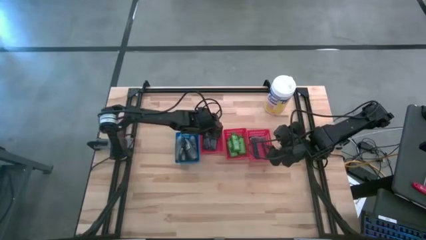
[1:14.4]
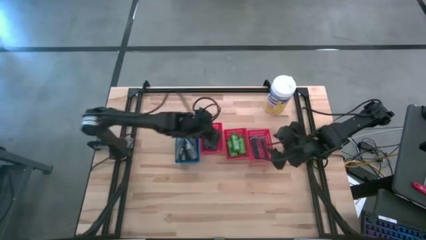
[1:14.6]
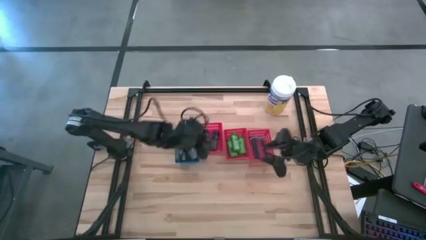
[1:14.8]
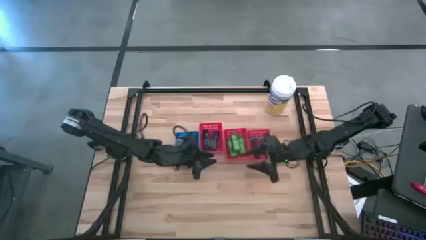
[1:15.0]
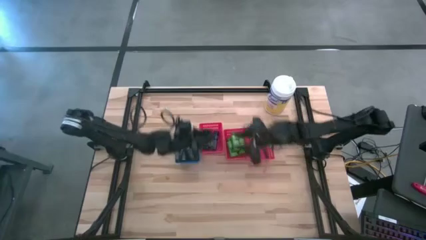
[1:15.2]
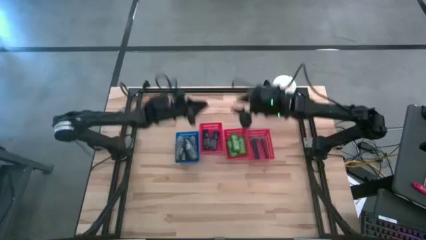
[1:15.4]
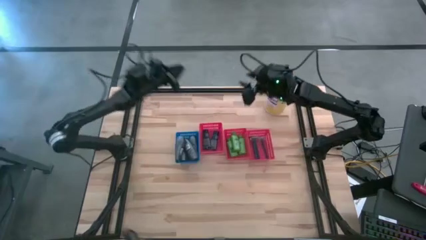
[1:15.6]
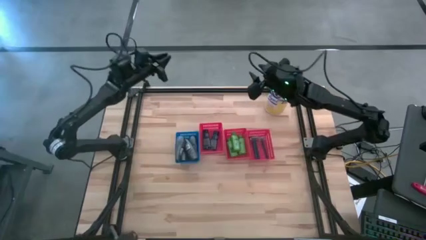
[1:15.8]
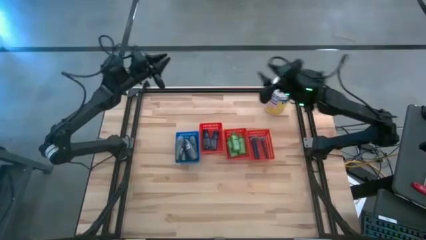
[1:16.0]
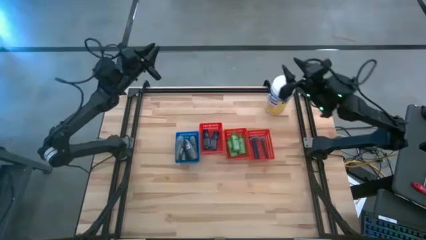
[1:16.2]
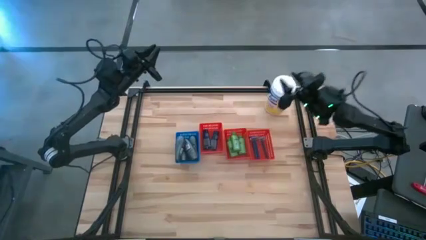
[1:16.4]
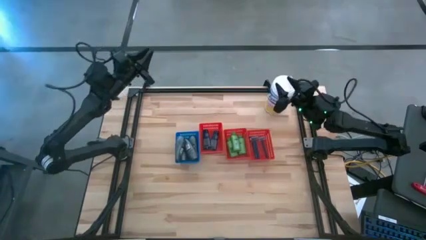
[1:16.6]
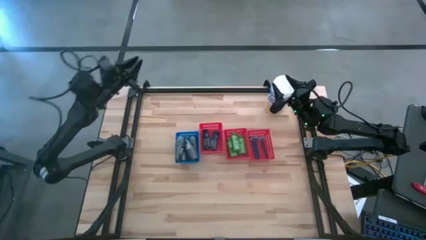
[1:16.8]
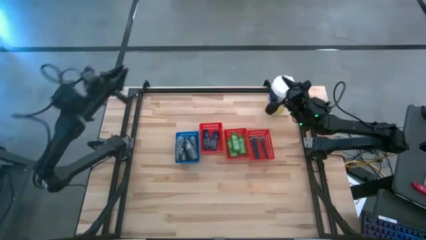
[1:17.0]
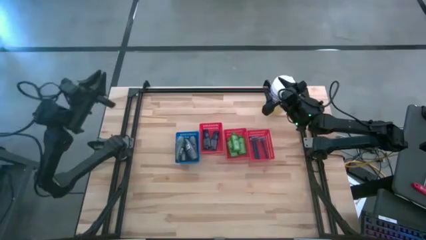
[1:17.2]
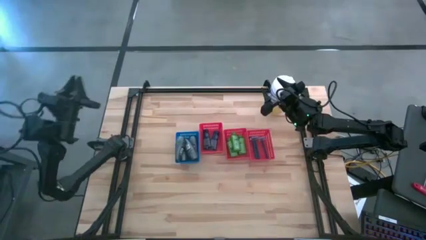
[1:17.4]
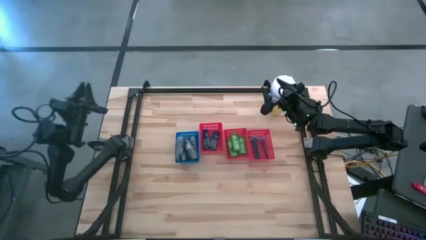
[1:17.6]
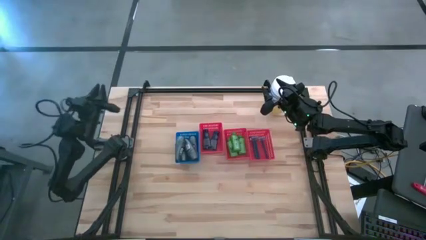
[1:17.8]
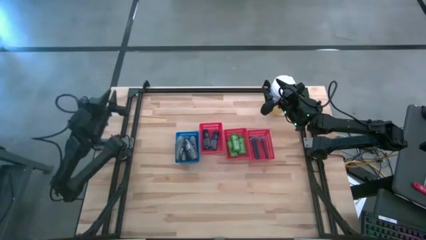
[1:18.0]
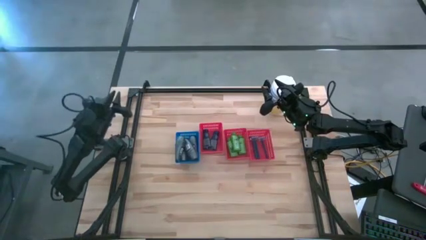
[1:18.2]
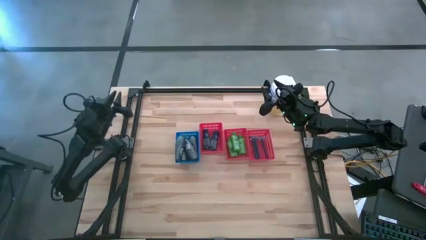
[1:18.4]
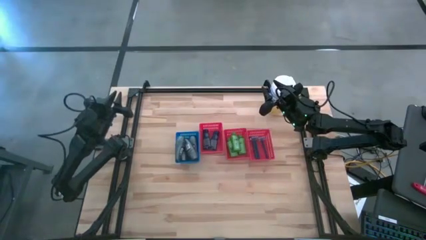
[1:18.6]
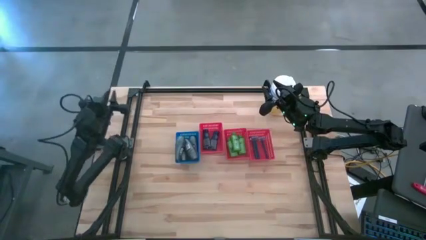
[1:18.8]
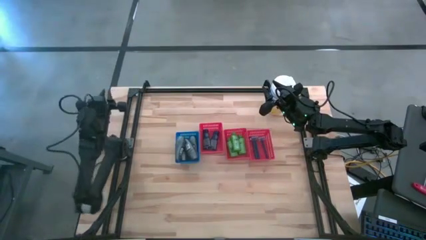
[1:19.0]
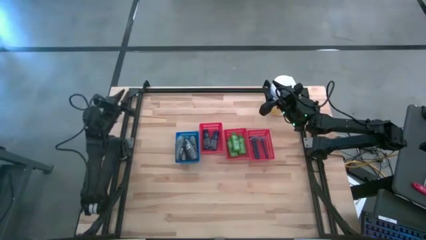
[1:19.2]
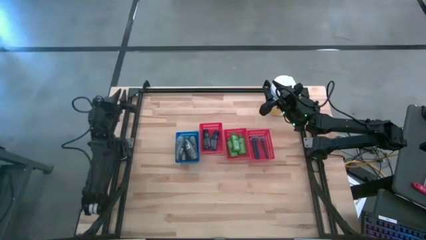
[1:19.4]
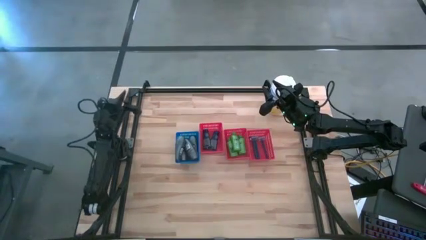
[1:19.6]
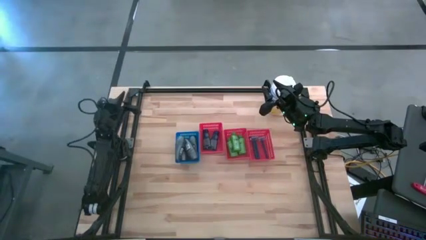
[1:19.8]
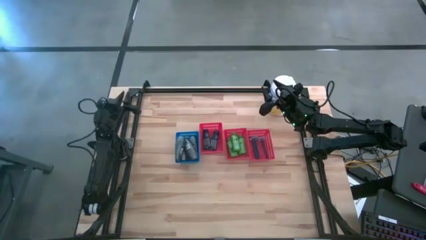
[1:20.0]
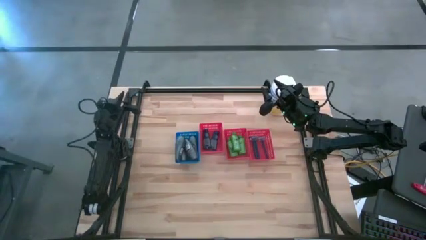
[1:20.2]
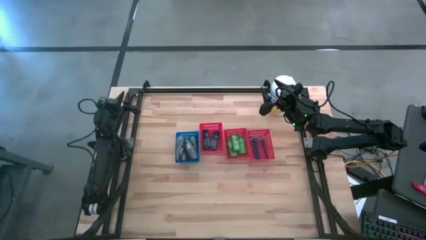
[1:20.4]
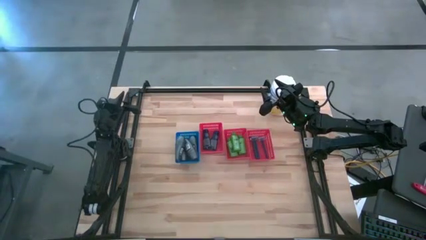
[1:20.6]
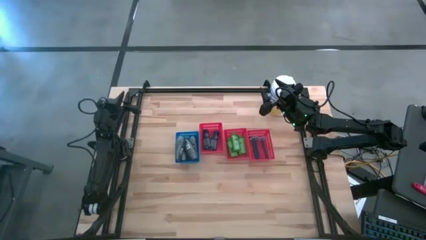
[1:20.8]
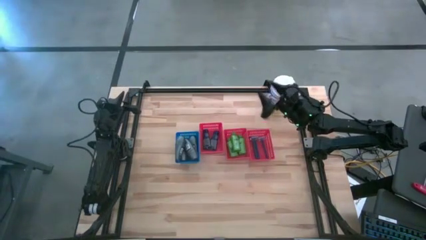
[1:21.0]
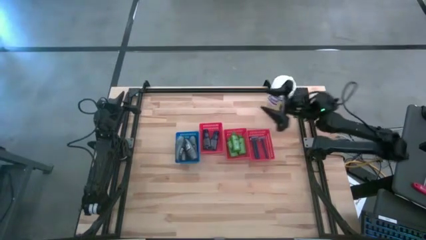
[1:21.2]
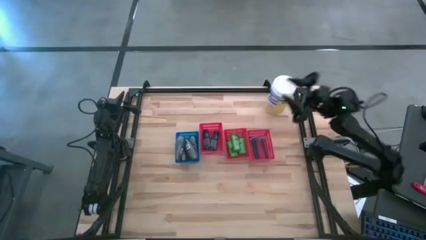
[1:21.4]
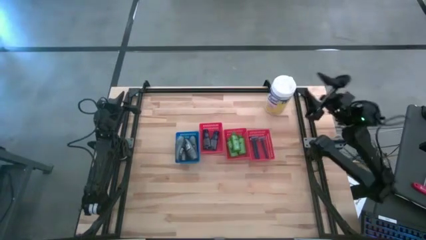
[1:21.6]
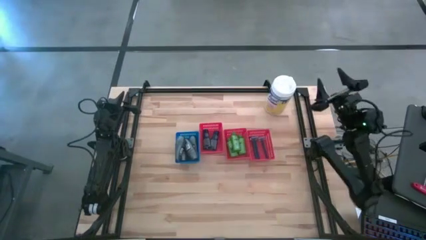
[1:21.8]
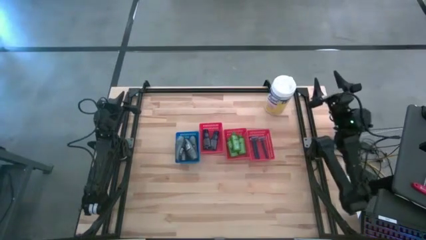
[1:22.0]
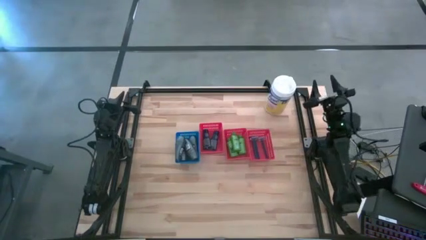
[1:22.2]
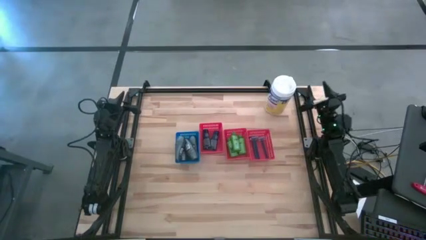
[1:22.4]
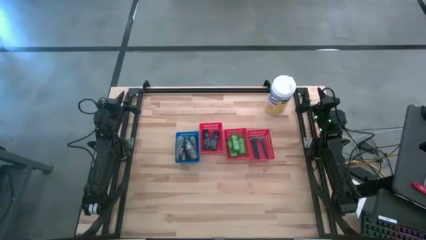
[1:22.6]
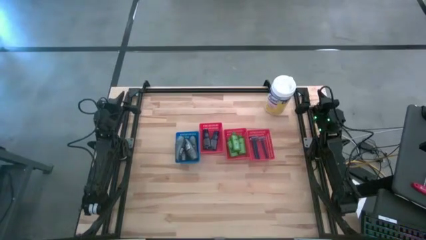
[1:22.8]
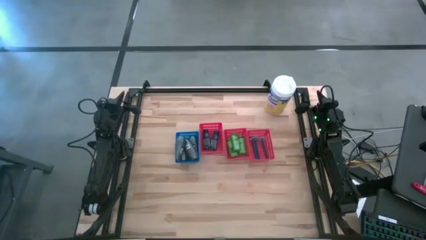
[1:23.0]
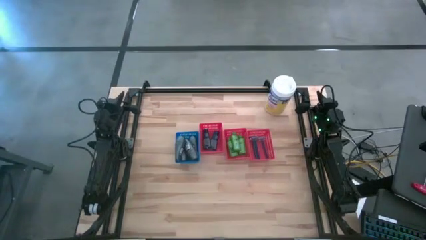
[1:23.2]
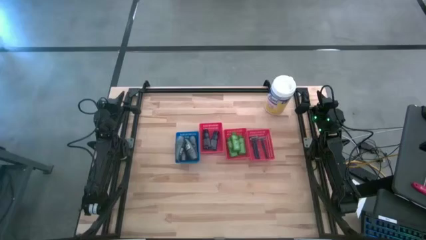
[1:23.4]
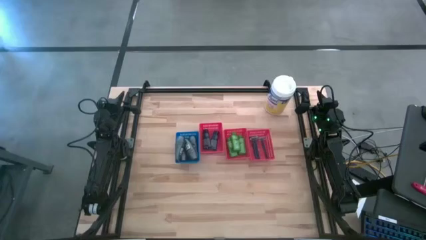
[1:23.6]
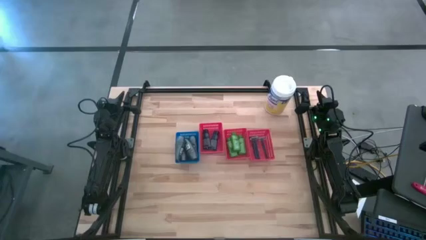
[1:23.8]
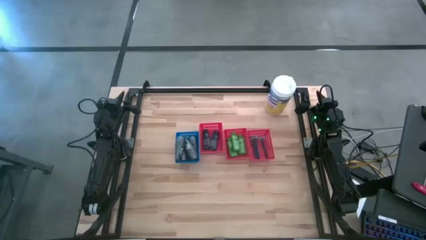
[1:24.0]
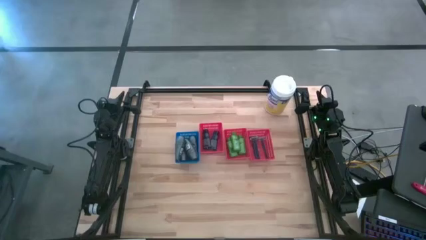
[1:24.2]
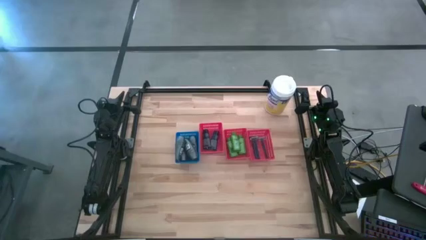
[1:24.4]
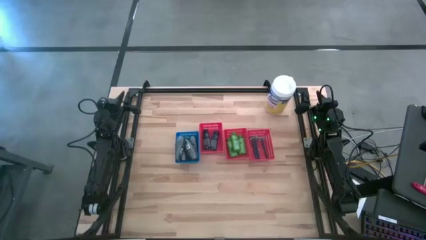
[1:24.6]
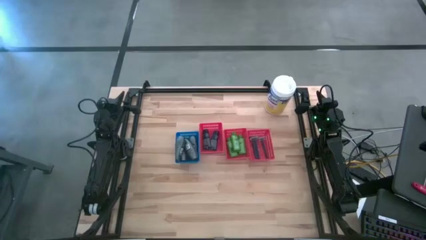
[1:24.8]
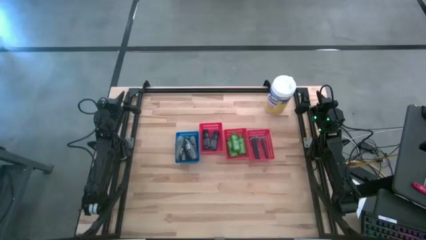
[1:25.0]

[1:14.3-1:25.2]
Task: Pick & Place Travel size toiletries
Return to Home Position

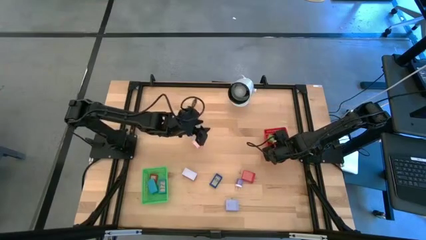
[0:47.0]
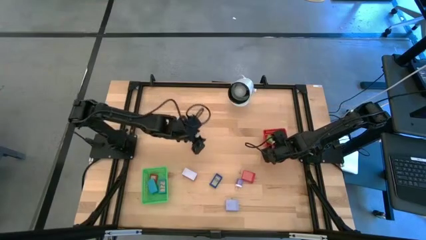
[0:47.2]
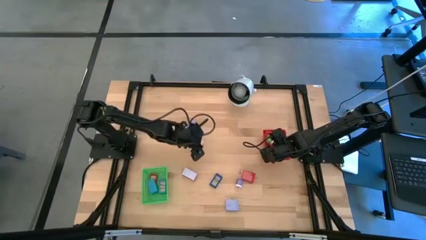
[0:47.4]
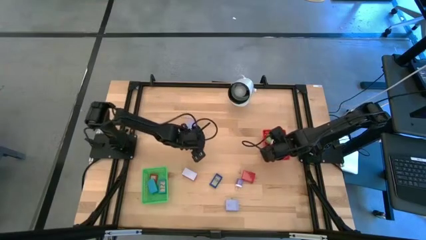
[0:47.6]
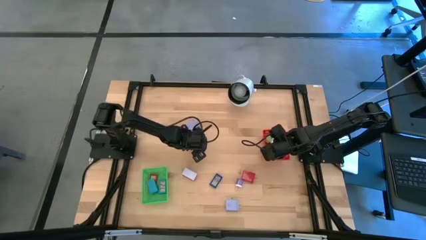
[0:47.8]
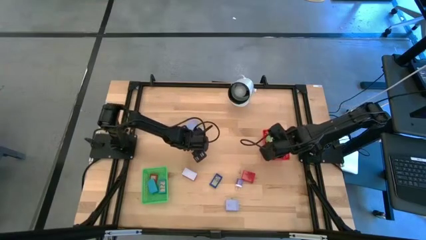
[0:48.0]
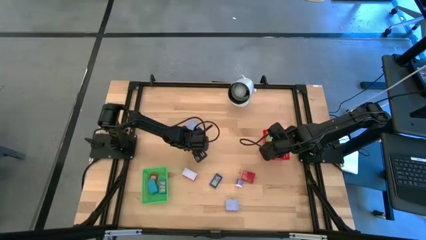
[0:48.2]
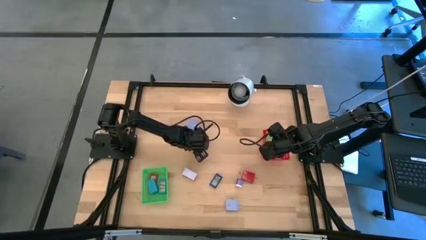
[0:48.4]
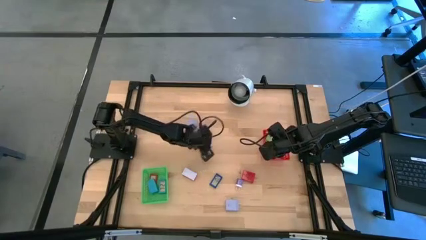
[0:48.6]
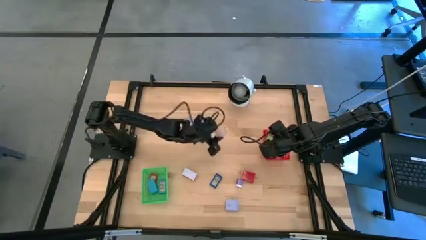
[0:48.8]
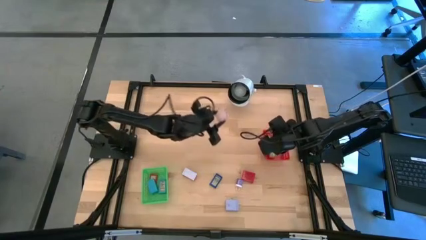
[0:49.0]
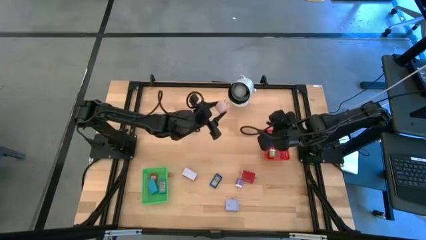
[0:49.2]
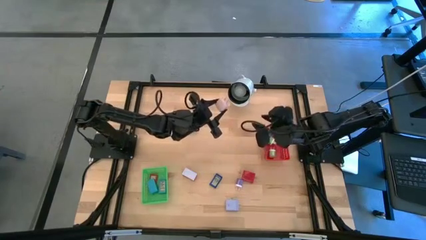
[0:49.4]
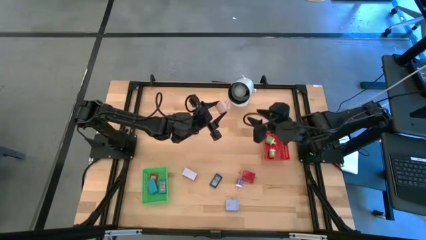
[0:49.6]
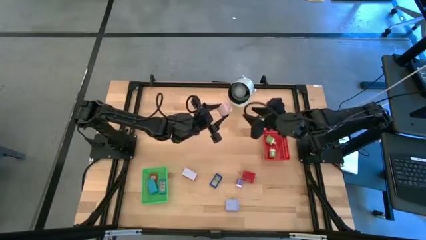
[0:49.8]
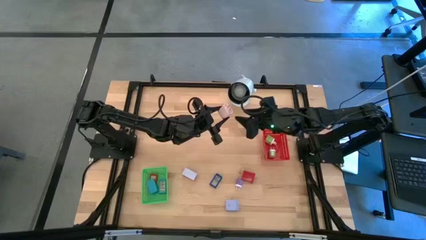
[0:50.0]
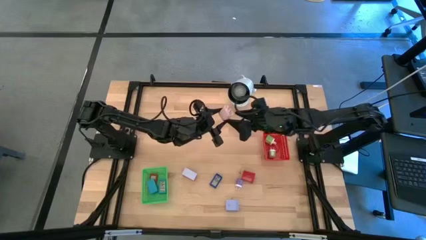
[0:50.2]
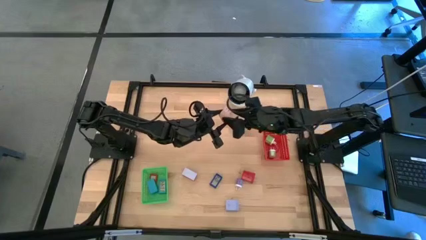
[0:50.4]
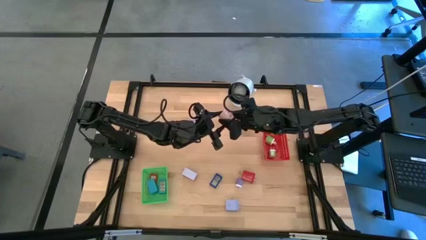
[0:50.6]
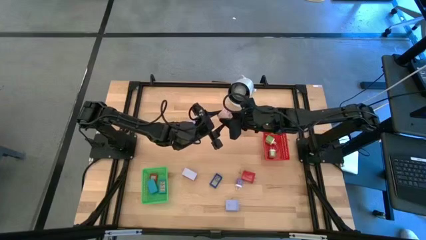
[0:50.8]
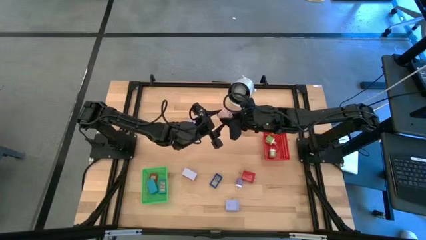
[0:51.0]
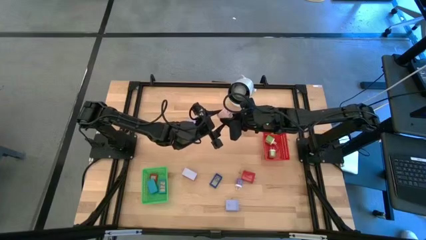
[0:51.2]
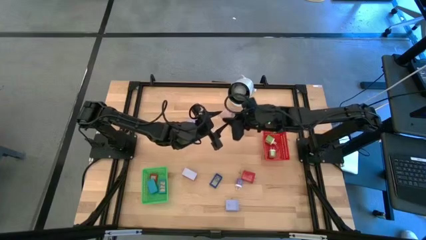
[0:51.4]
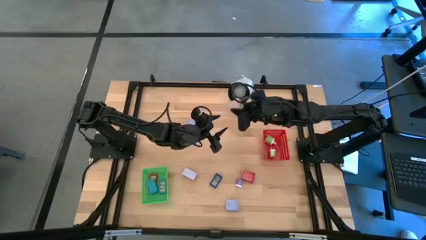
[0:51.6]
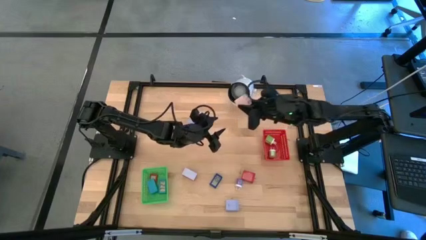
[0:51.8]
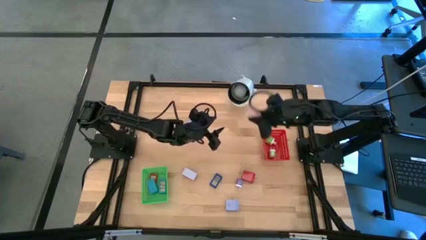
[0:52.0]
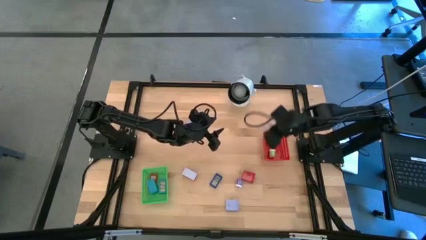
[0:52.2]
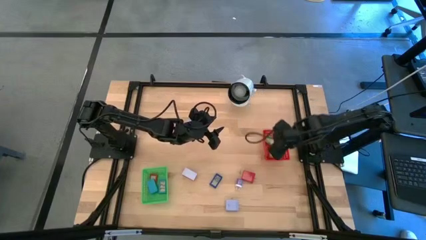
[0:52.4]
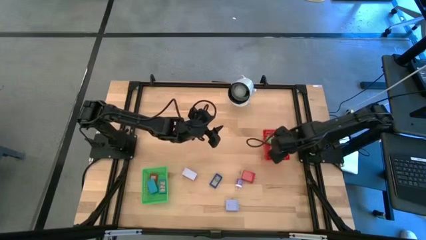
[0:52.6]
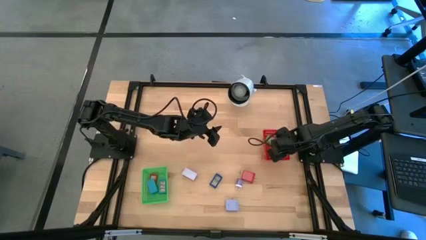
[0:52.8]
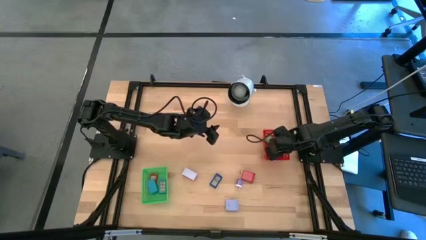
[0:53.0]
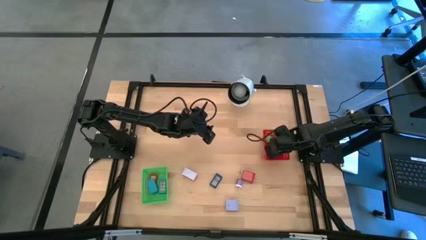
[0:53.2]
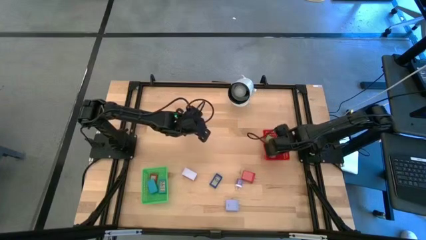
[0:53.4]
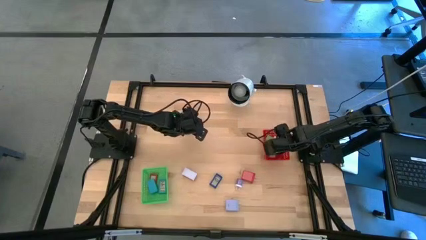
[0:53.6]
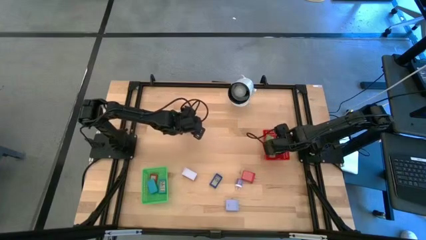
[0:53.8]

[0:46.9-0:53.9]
Task: Pick & Place Office items
Put the white charger adapter into the red bin
